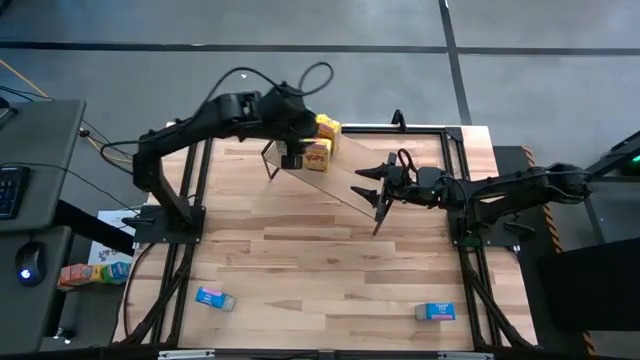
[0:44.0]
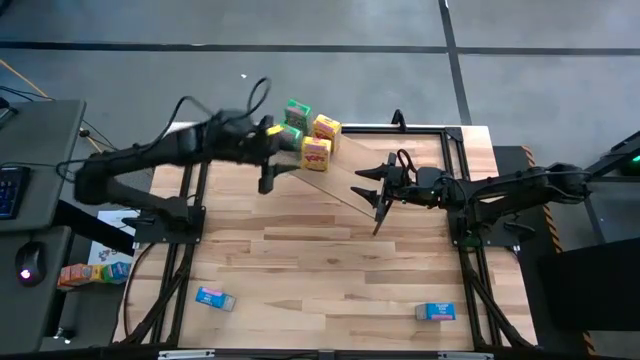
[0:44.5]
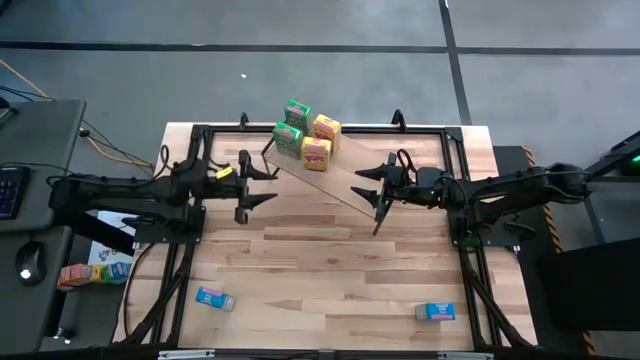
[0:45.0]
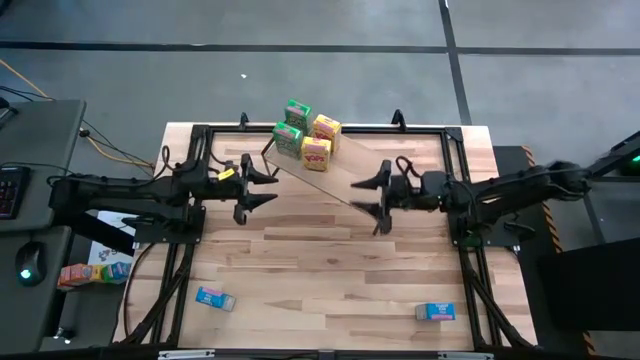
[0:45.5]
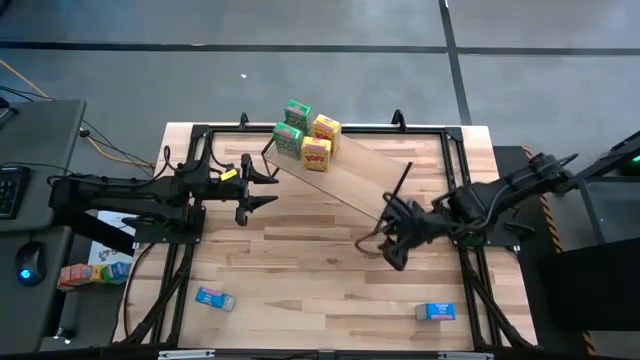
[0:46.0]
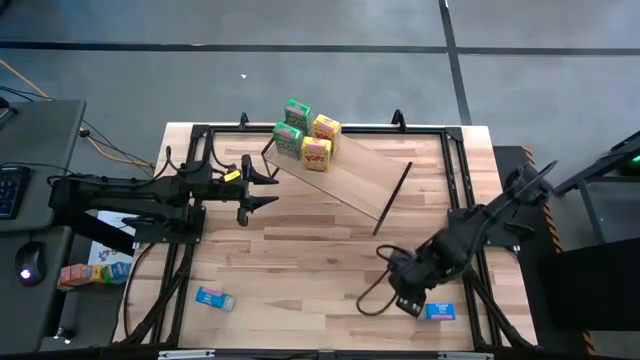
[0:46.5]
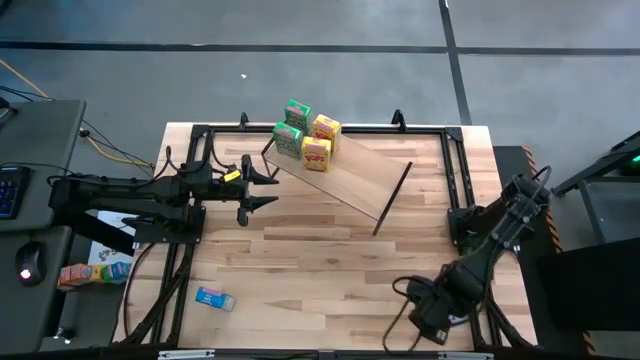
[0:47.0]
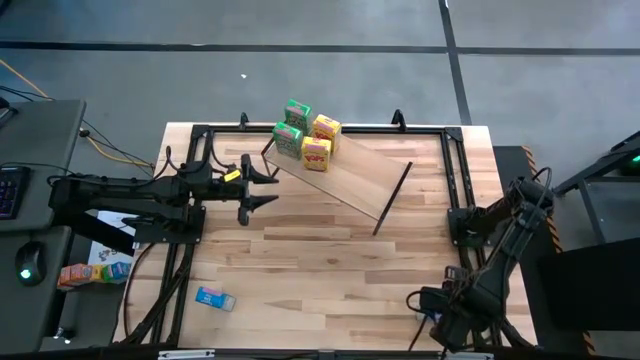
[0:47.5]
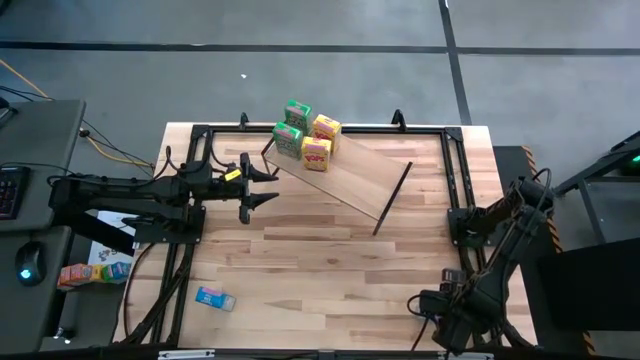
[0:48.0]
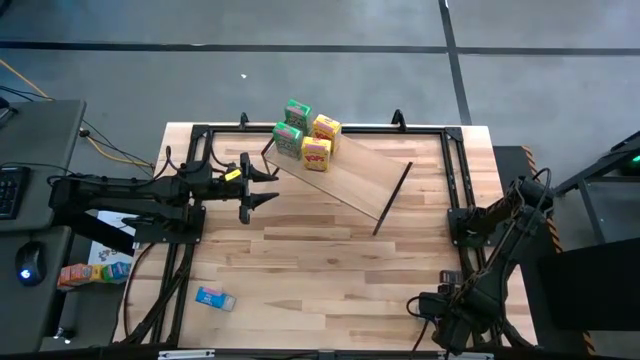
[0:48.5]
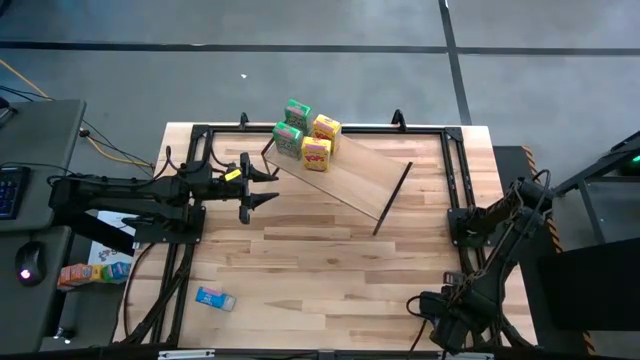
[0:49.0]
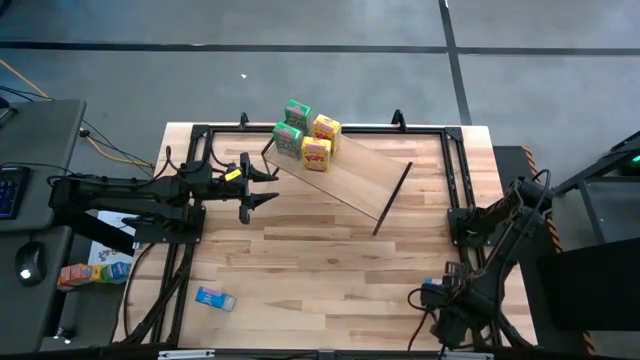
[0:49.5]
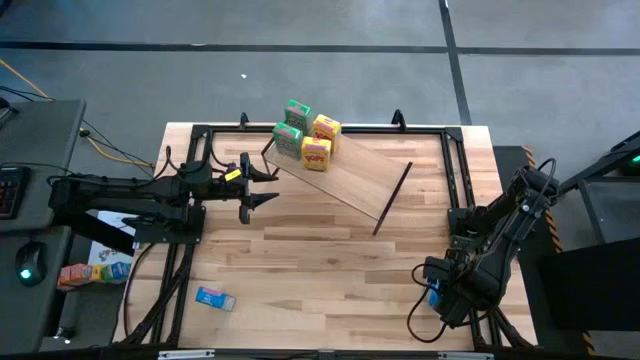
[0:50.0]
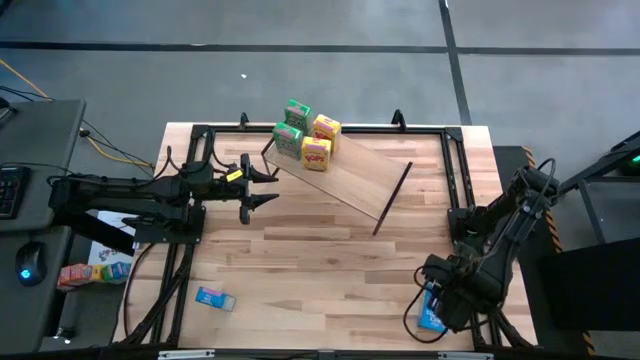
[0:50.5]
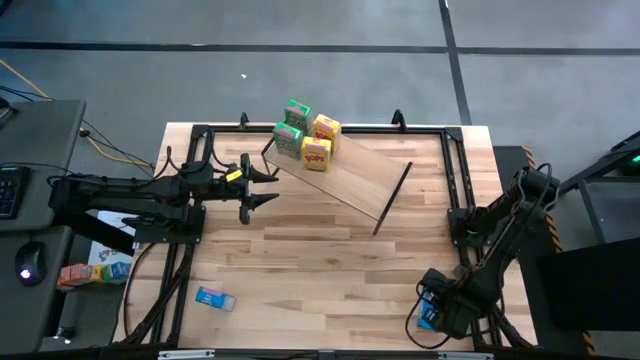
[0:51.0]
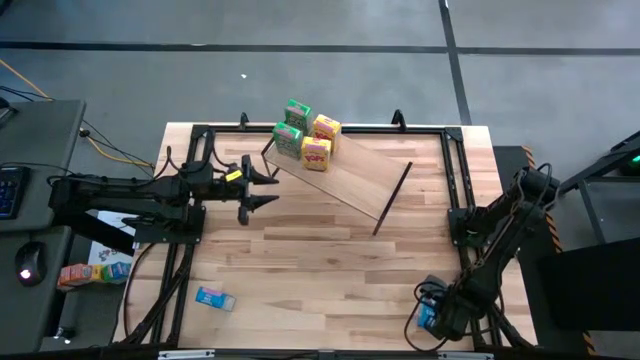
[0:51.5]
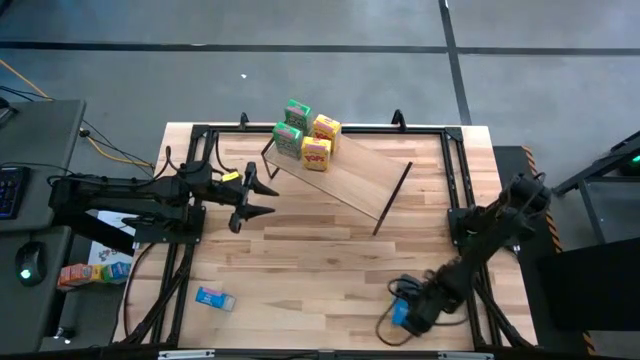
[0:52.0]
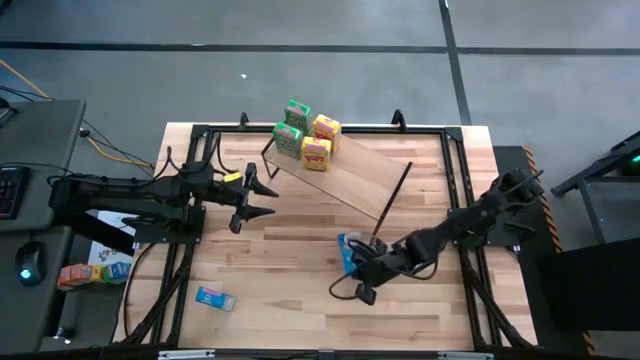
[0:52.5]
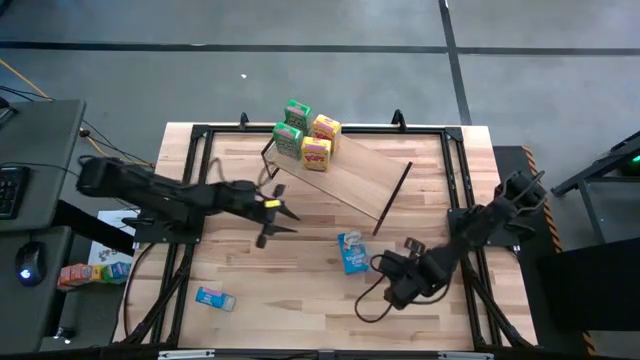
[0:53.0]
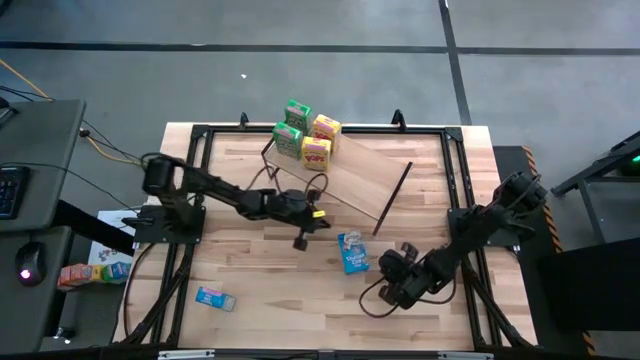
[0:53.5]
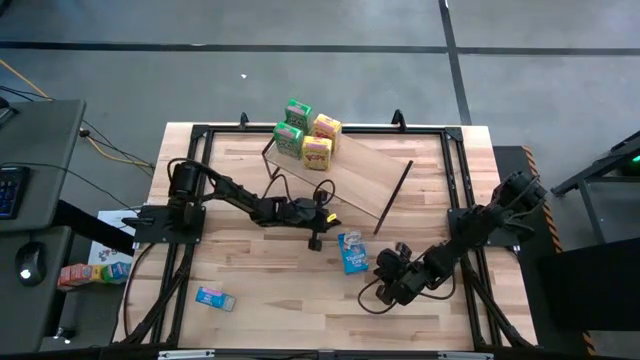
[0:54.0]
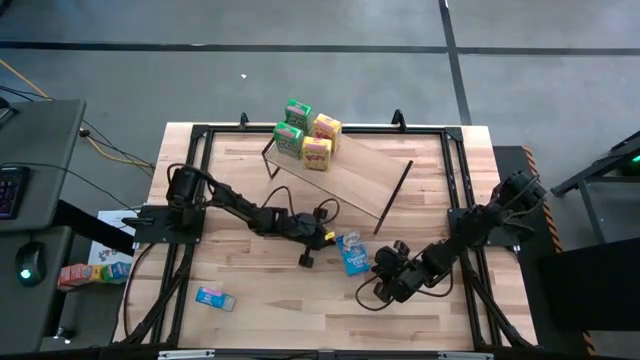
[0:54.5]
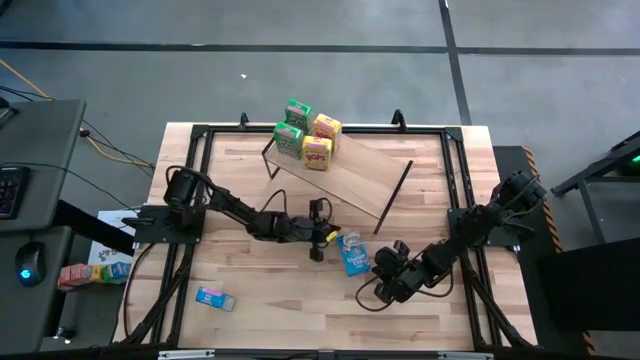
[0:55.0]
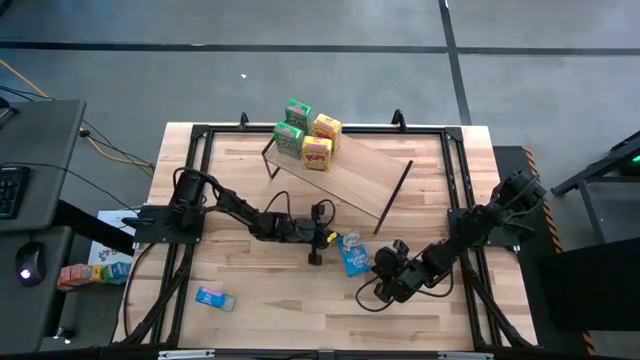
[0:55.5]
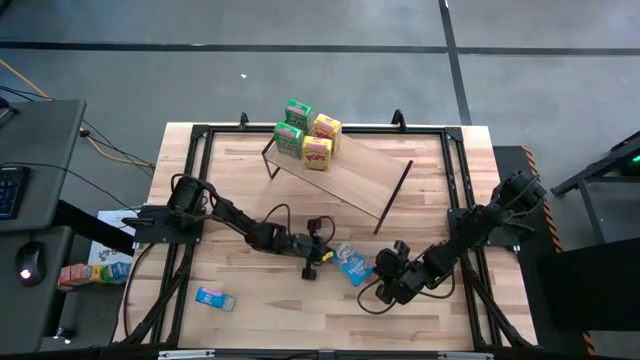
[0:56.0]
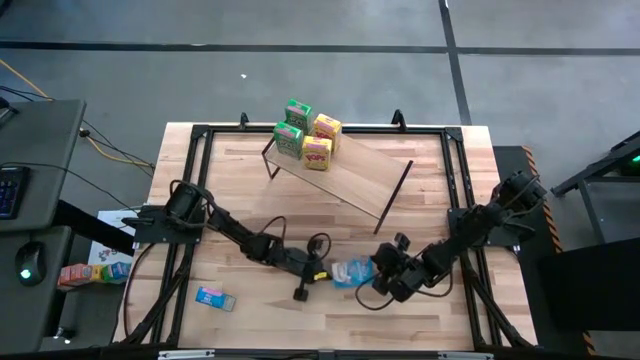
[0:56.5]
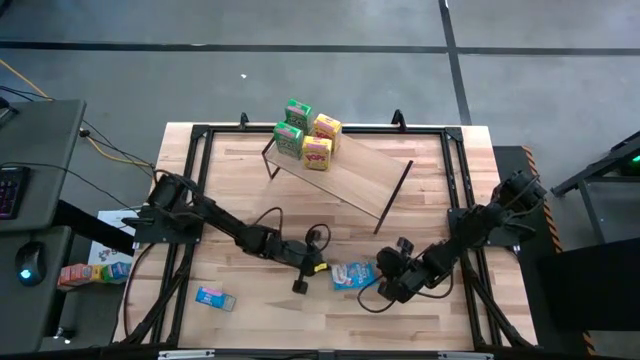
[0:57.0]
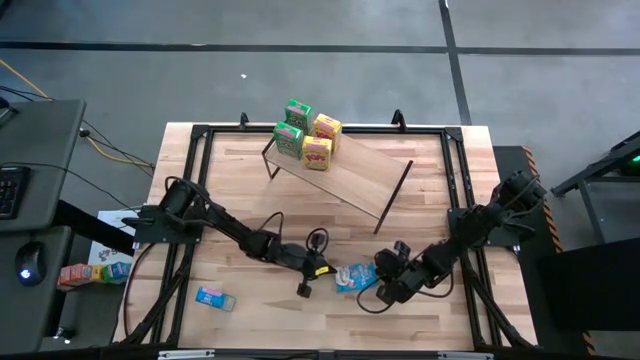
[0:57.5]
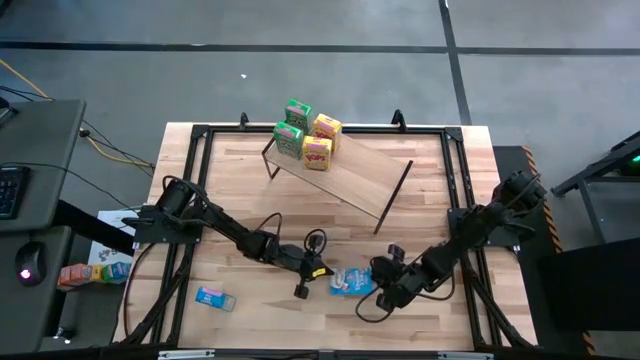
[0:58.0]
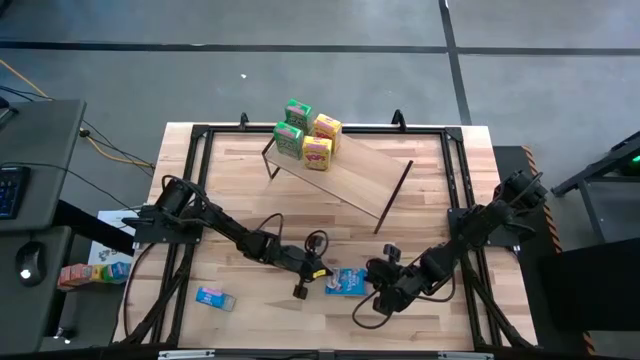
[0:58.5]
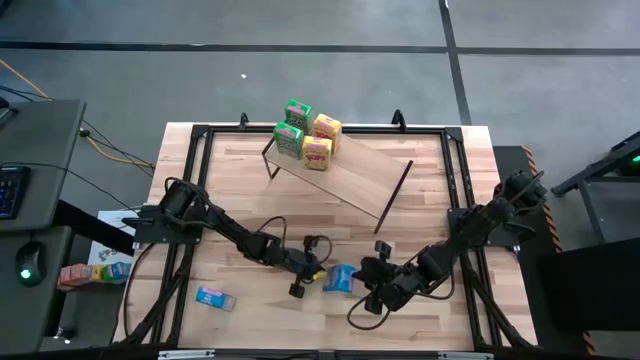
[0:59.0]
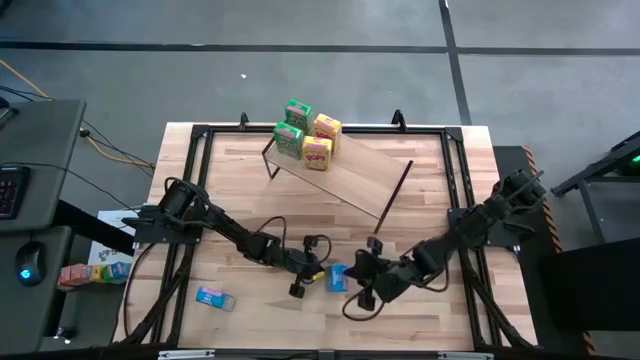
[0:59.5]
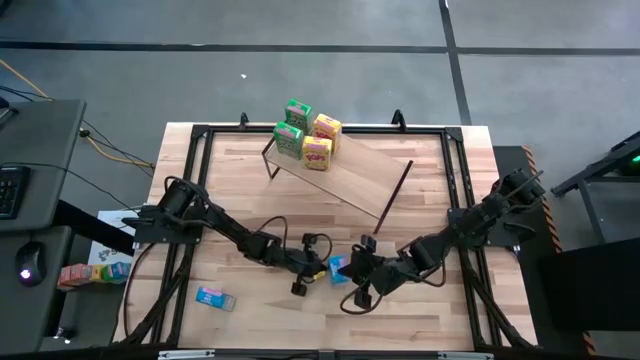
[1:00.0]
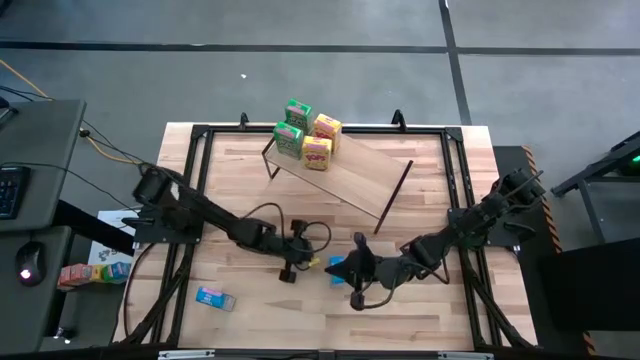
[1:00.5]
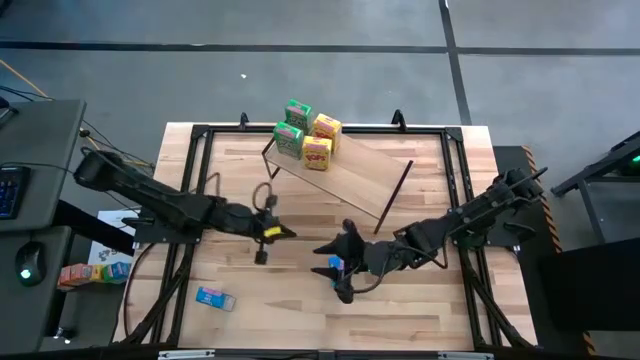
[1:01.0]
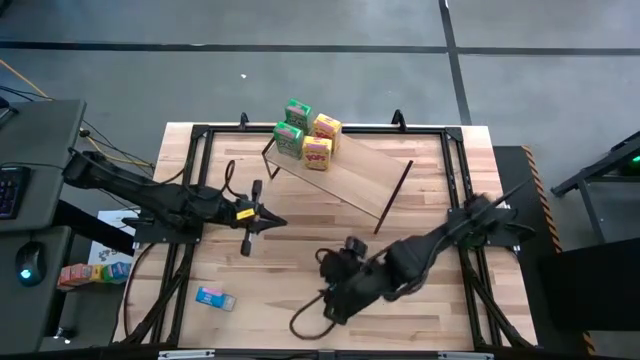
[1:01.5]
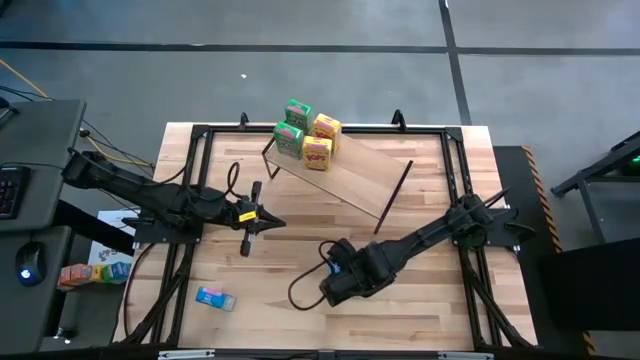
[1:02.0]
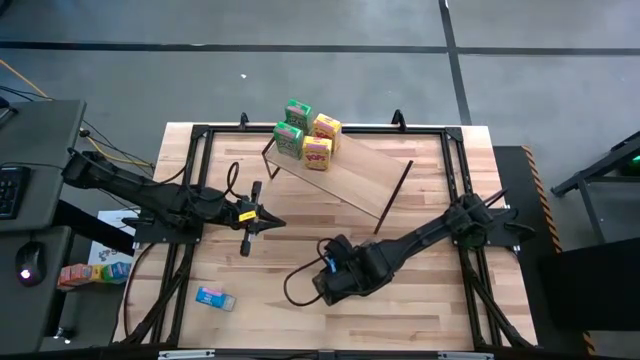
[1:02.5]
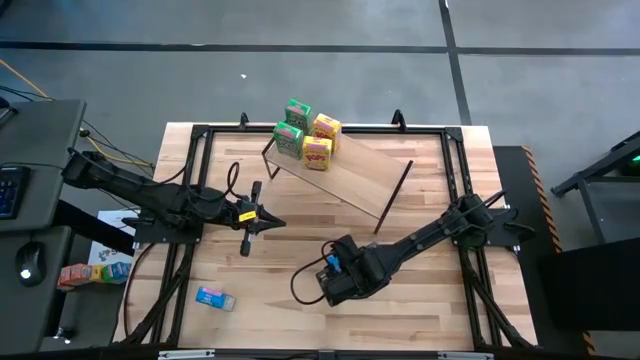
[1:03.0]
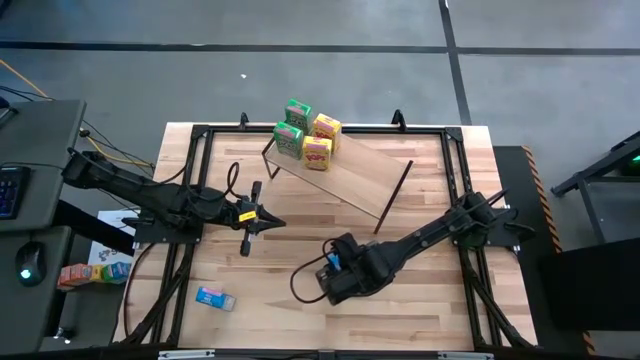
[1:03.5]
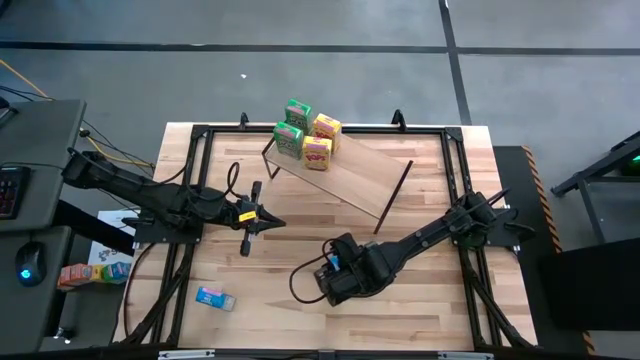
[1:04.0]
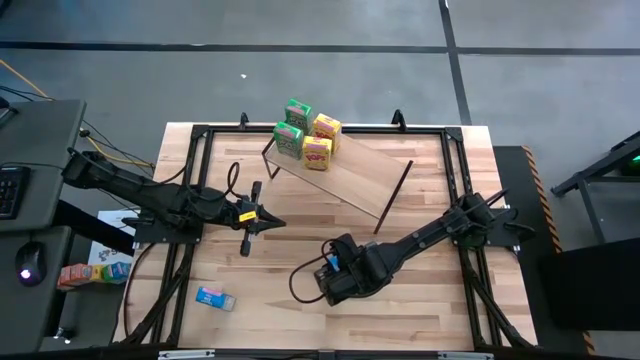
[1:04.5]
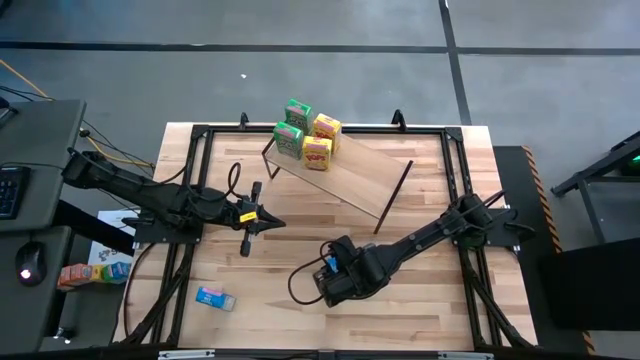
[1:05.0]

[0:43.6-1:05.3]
Task: Stack cereal on shelf
Put the right blue cereal box on the shelf

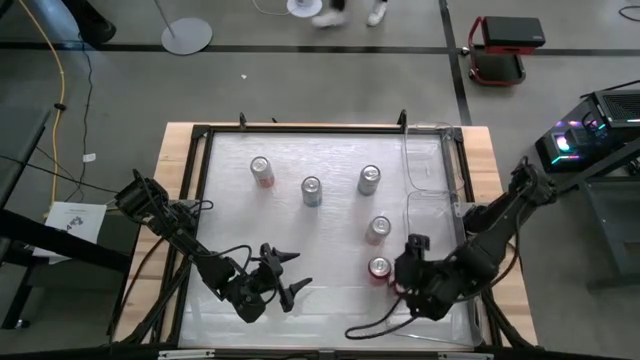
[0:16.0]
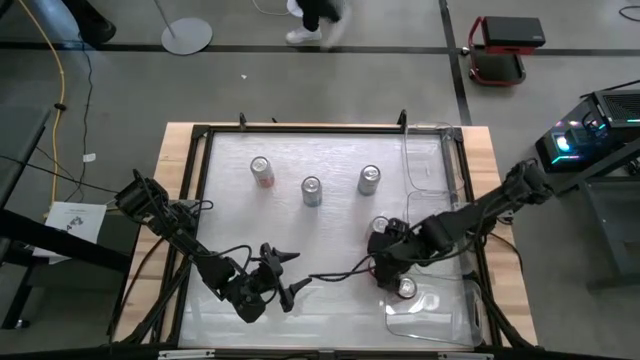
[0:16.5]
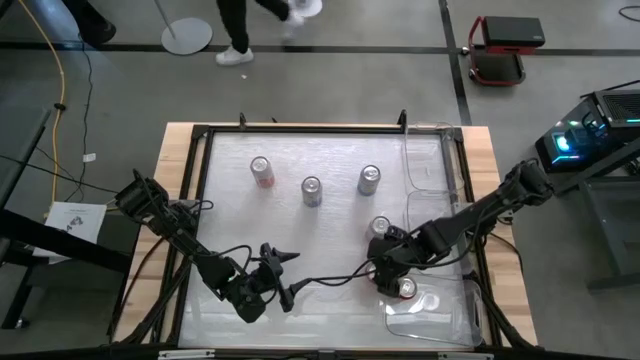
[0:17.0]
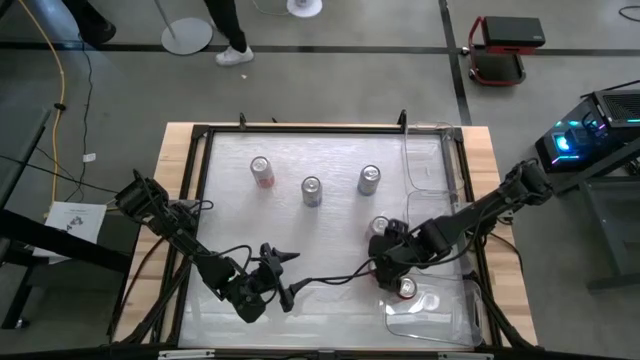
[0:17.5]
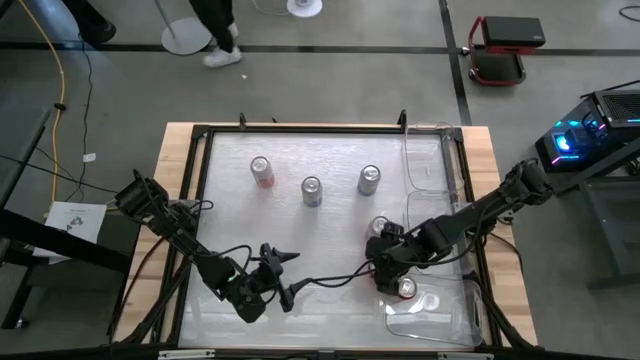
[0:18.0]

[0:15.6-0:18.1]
Task: Sort soda cans
Put the red-black soda can into the bottom transparent bin
